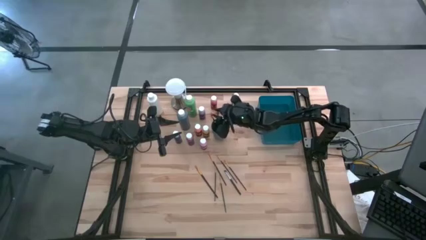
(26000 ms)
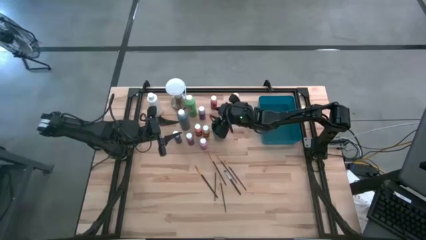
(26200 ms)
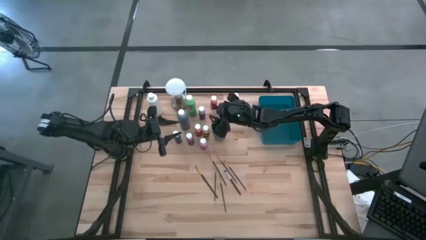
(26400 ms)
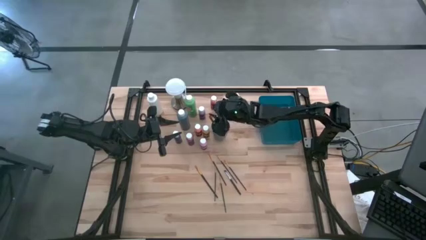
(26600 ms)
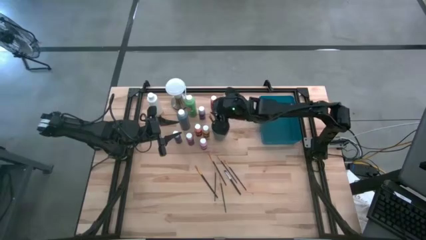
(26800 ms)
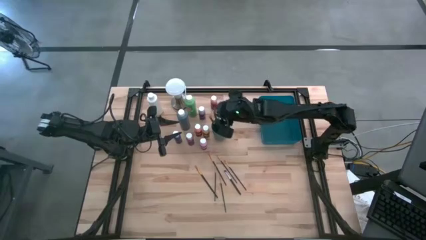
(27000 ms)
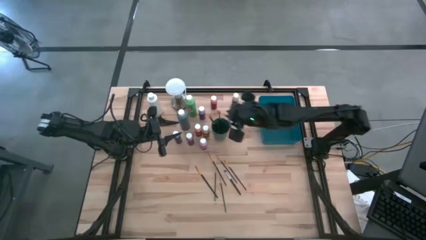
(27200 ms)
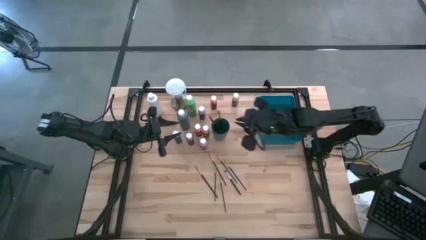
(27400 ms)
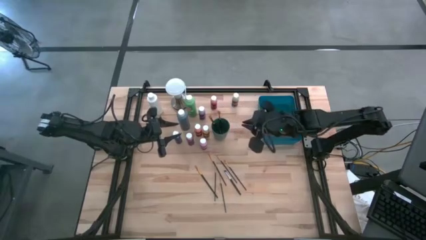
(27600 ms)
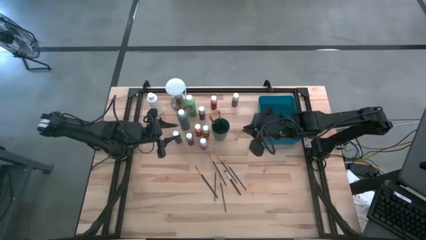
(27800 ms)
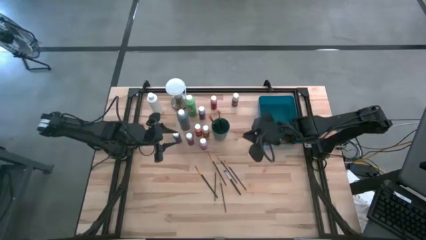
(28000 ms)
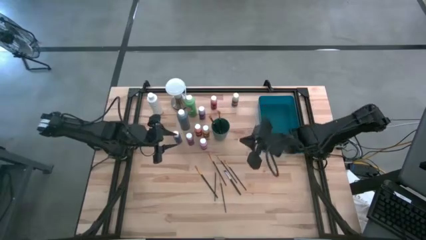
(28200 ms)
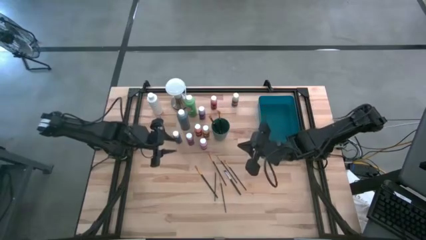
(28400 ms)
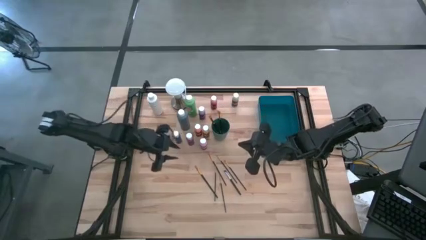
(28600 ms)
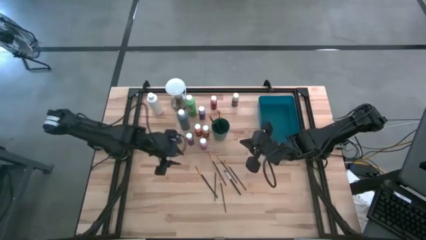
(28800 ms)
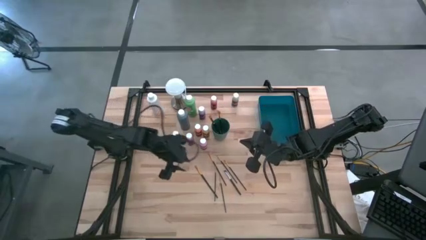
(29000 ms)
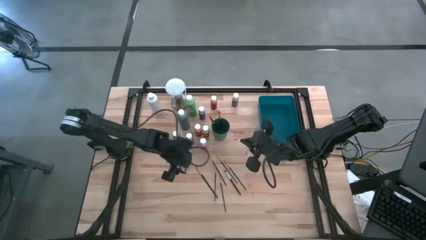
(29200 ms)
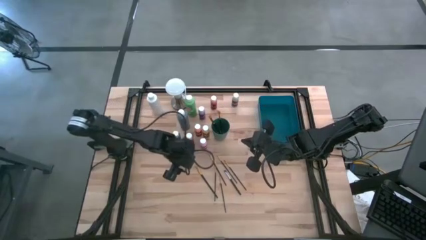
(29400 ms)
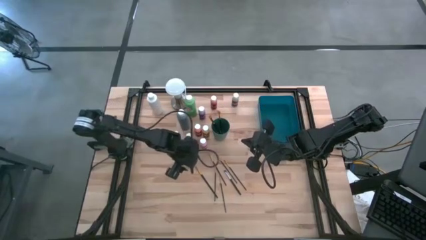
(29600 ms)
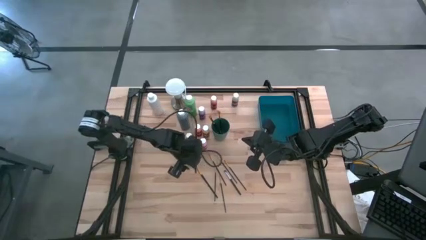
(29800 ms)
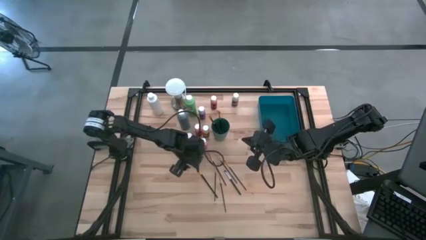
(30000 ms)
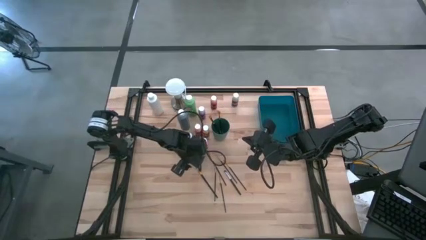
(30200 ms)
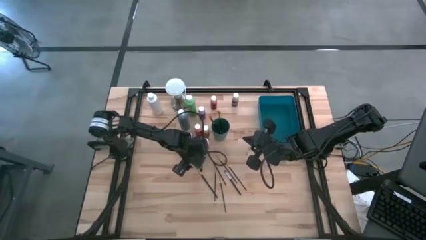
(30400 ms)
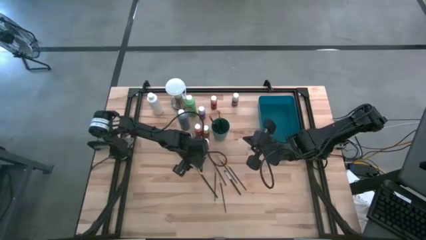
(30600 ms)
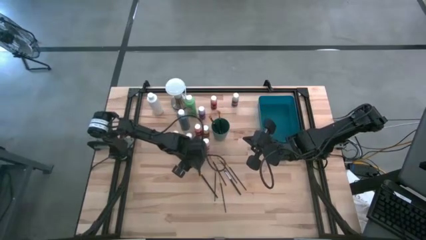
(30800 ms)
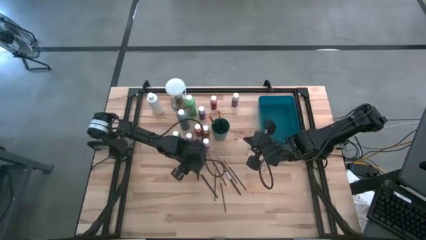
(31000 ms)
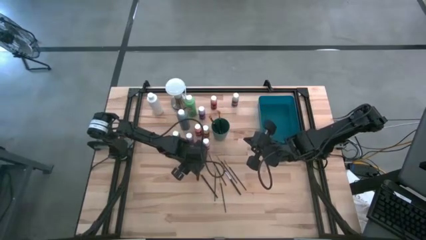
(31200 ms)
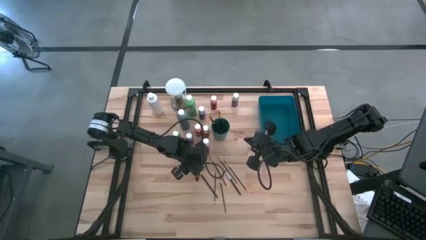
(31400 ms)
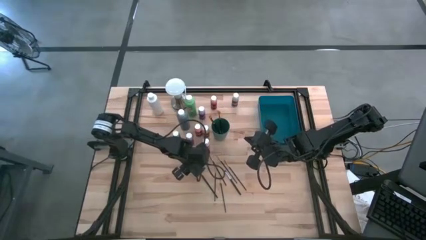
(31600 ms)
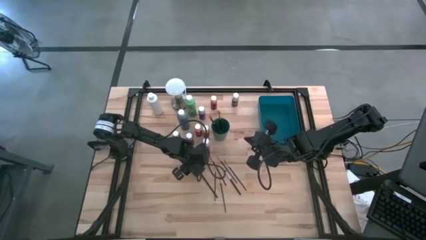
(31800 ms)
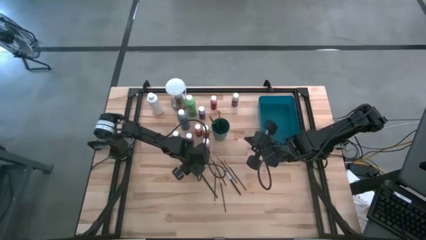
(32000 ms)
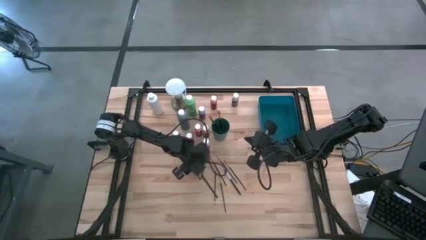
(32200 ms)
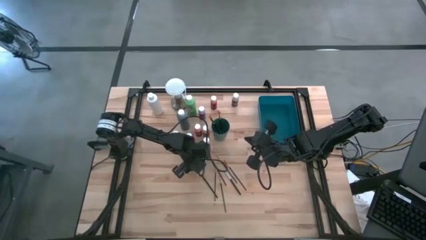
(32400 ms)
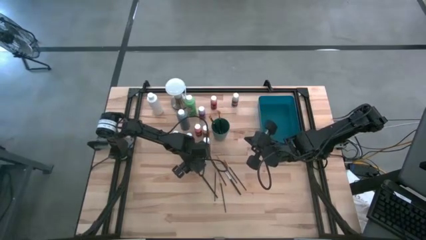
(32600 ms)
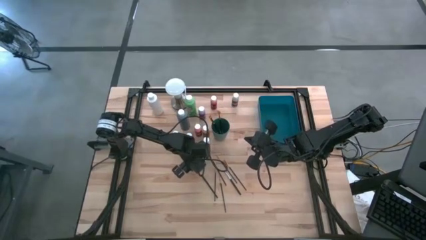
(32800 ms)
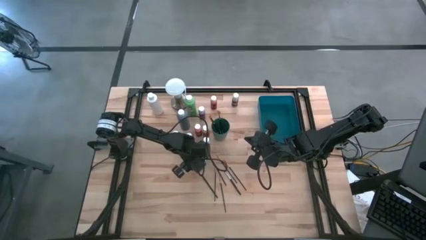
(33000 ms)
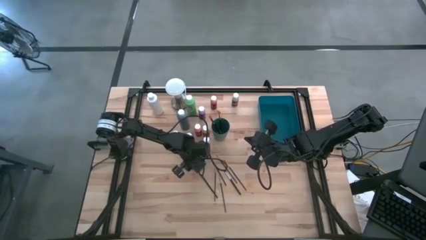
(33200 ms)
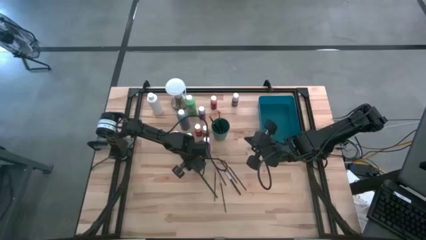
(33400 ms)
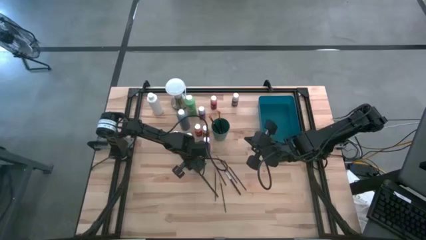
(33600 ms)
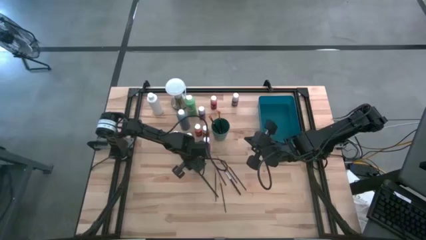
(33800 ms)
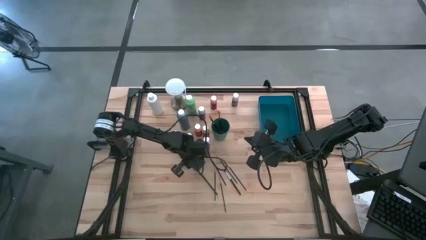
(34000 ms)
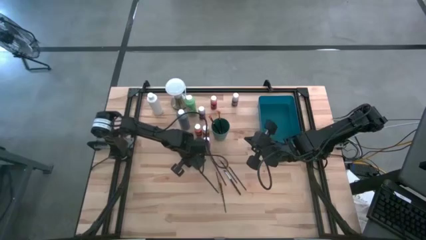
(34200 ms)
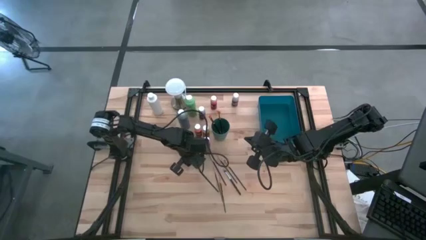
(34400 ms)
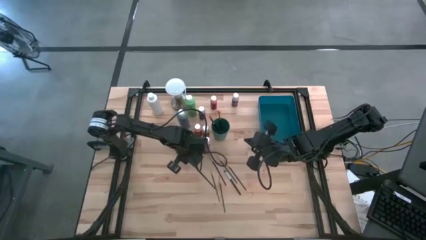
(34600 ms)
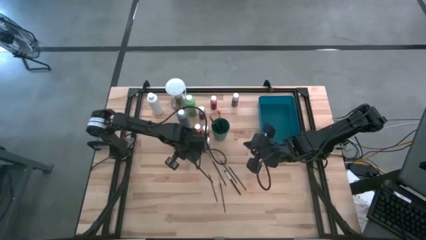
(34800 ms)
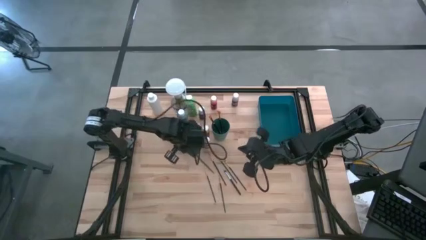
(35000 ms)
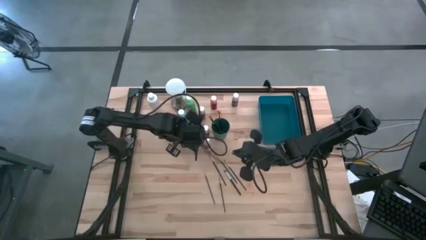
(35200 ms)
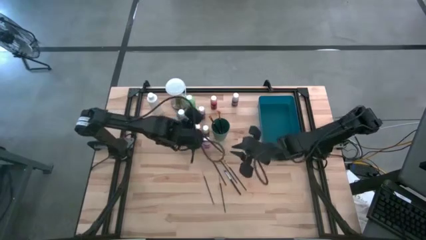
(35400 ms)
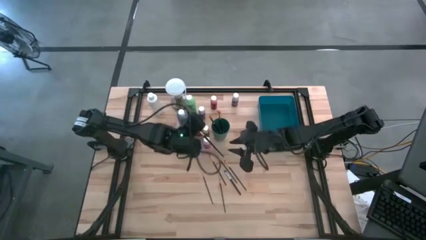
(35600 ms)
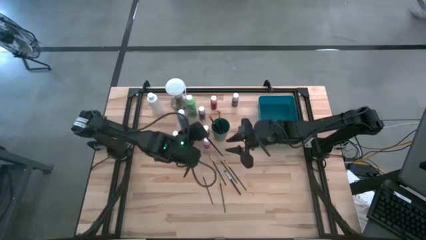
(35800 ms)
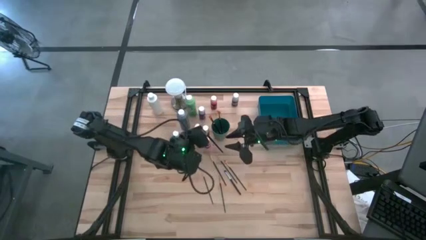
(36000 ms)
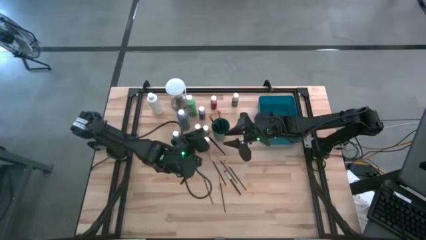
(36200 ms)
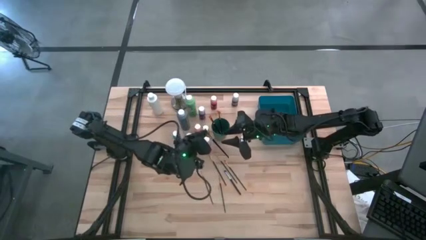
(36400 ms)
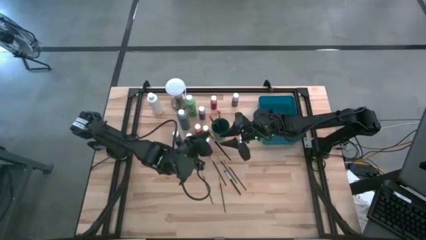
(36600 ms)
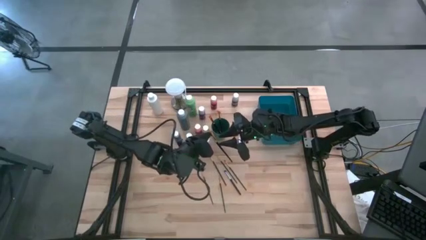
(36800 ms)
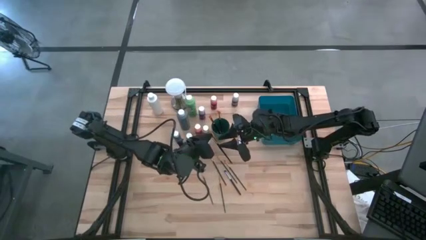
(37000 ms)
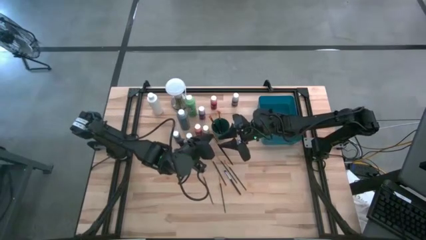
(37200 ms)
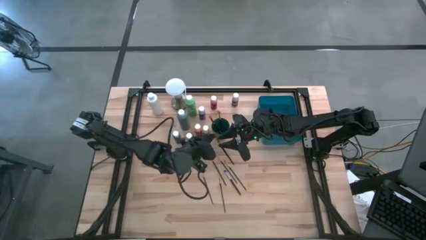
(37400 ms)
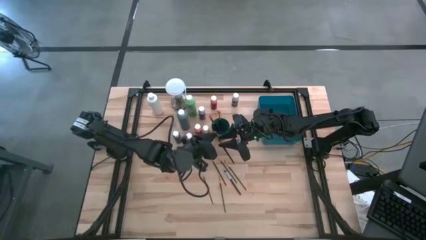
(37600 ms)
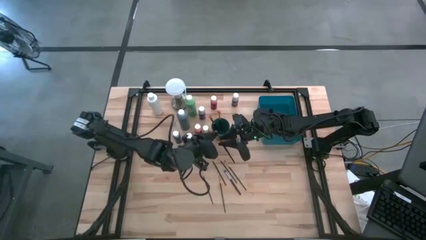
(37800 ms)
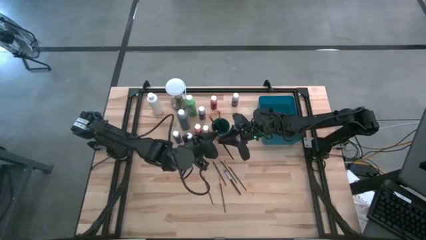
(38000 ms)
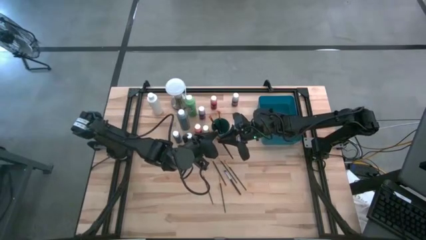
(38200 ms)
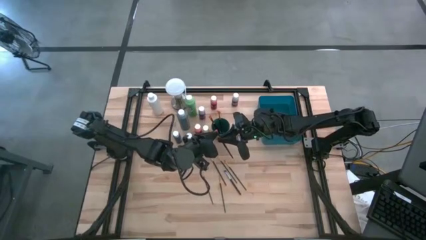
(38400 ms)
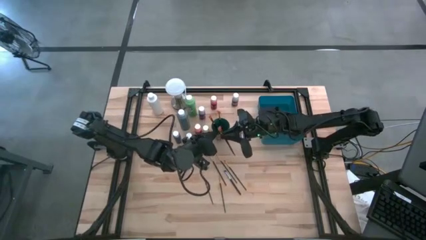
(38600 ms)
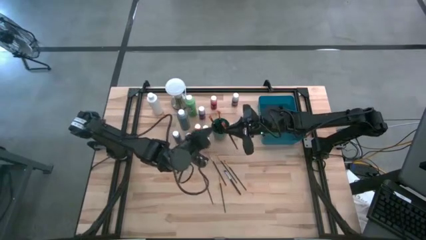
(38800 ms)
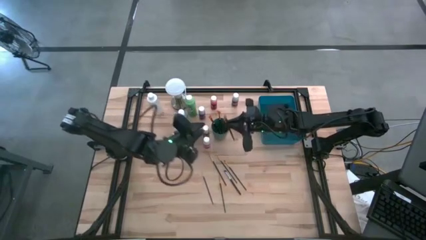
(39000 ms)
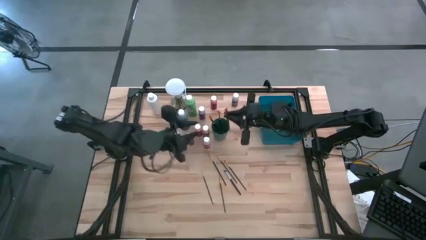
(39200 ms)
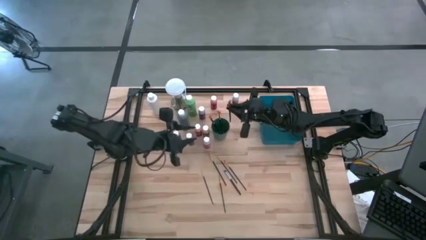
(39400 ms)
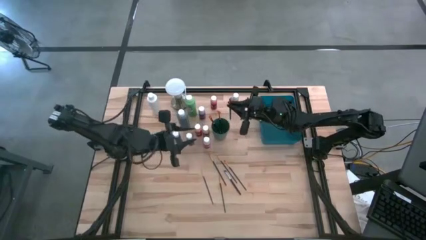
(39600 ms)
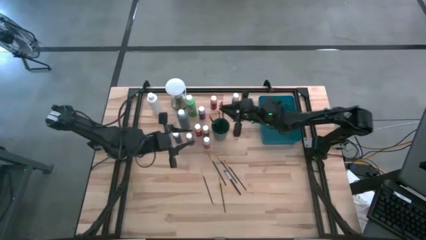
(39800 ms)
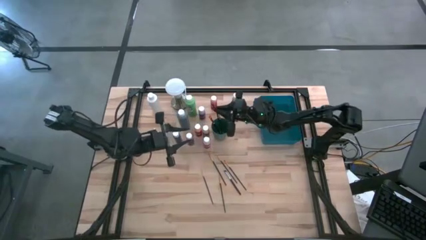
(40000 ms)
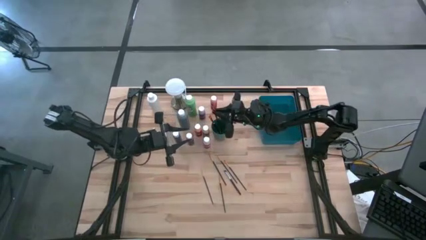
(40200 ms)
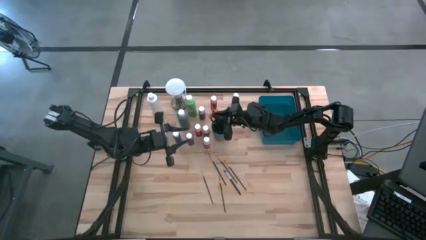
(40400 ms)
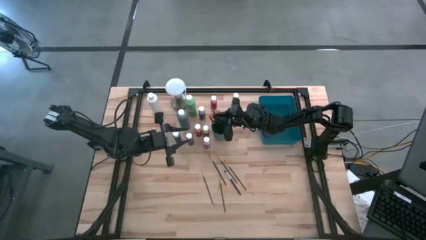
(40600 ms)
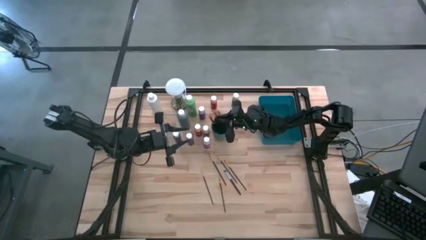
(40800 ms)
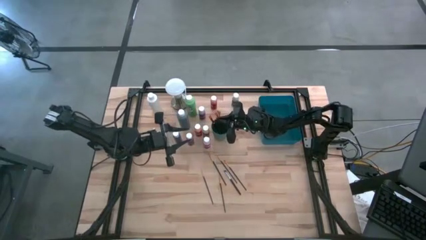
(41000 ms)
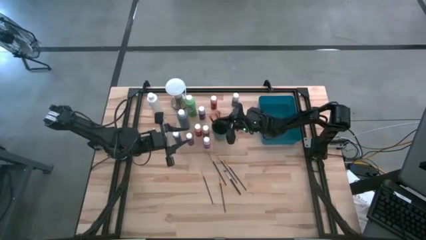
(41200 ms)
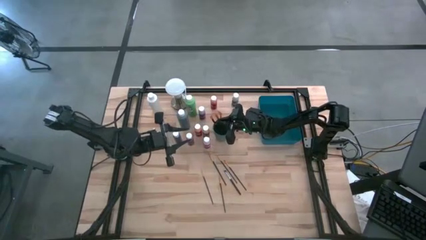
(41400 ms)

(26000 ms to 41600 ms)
Task: Pick & Place Paint Supplies
Put the gold paint brush into the green cup
